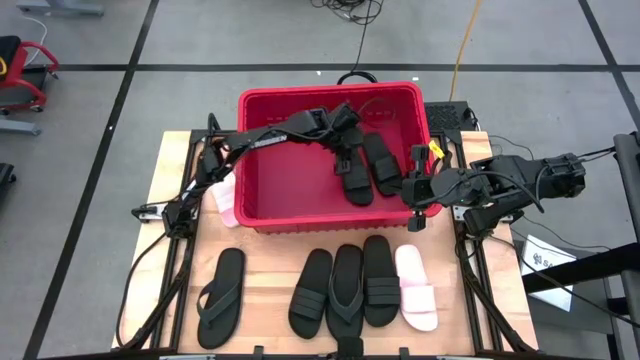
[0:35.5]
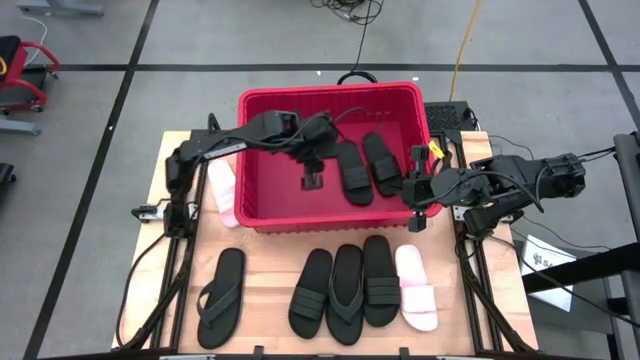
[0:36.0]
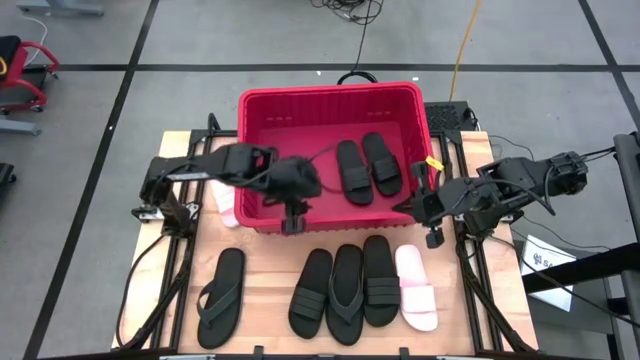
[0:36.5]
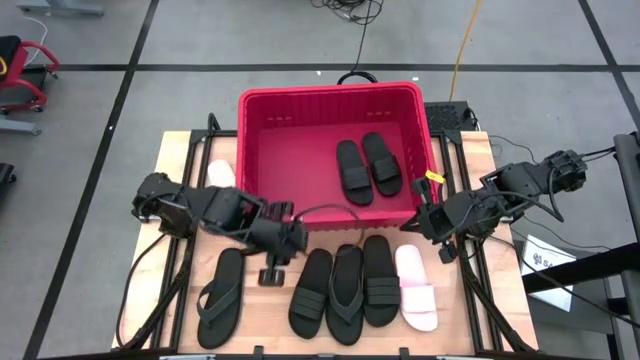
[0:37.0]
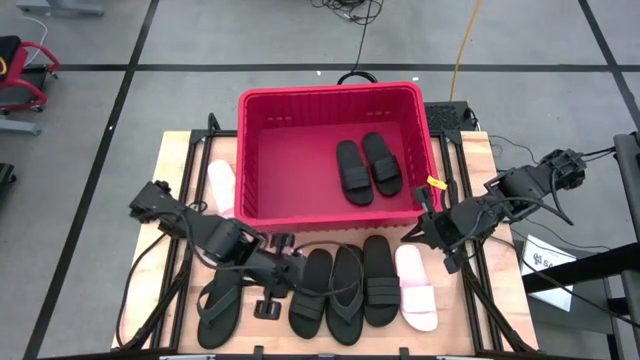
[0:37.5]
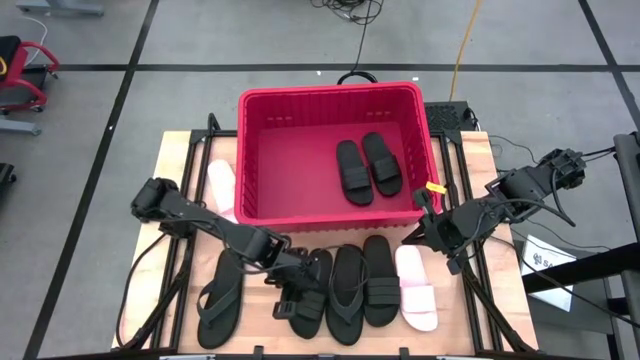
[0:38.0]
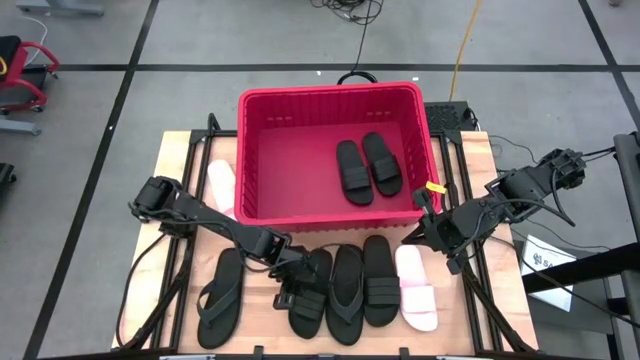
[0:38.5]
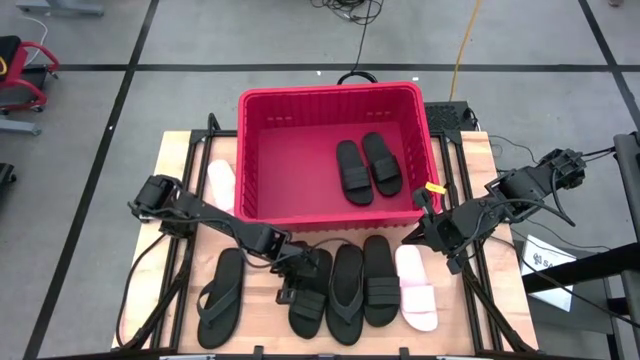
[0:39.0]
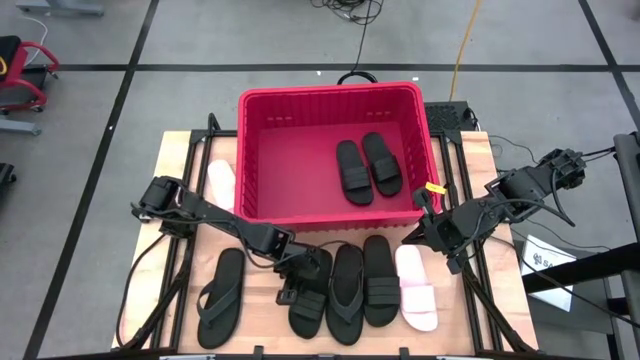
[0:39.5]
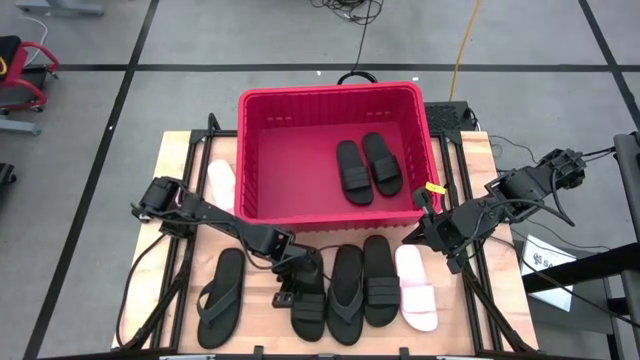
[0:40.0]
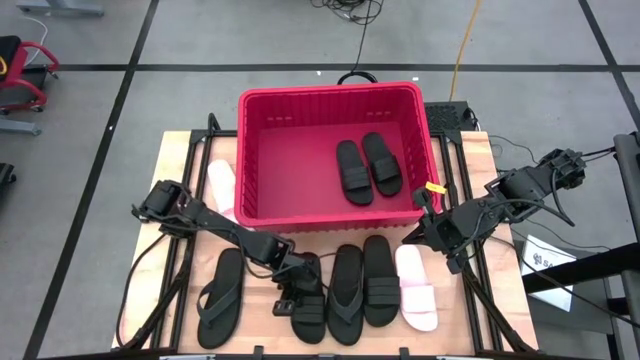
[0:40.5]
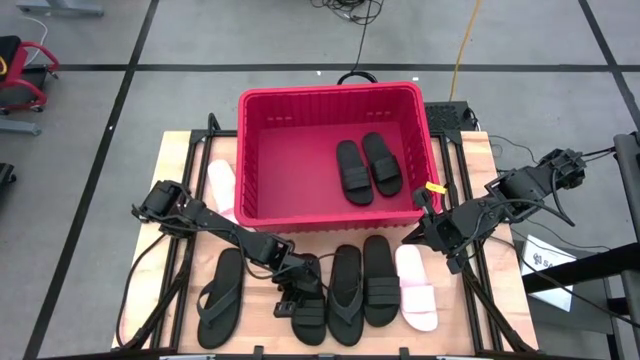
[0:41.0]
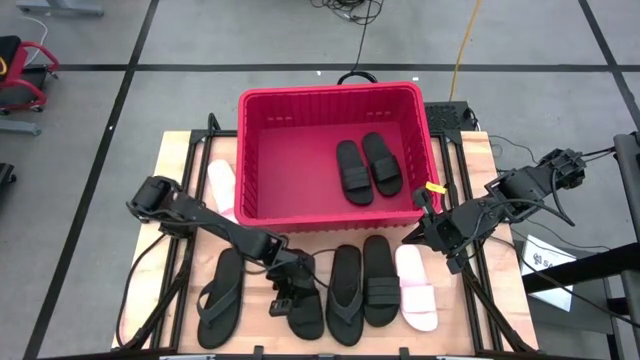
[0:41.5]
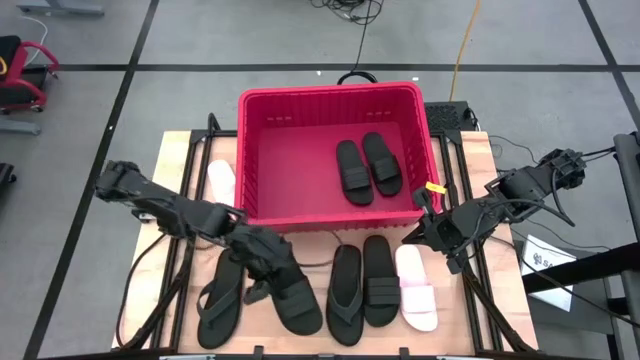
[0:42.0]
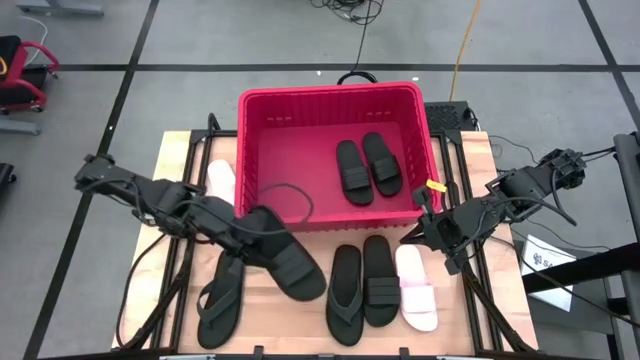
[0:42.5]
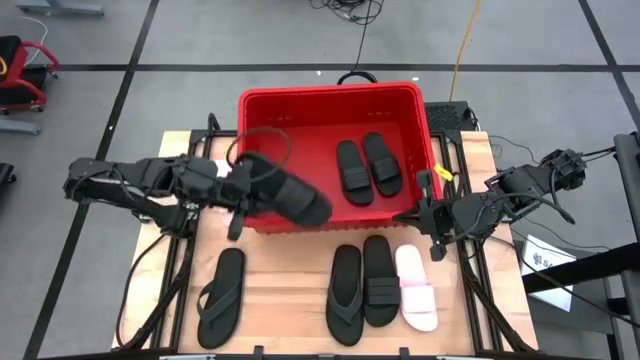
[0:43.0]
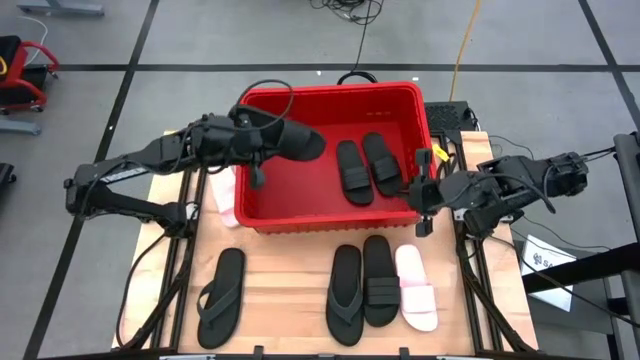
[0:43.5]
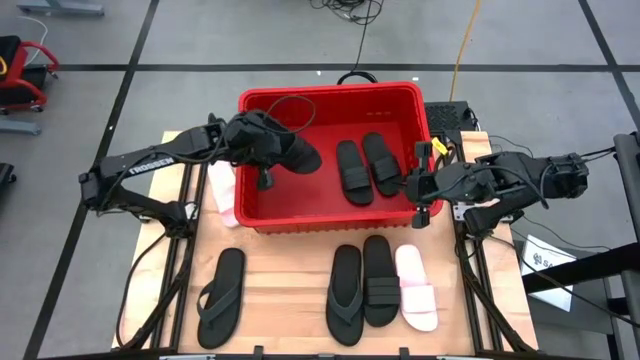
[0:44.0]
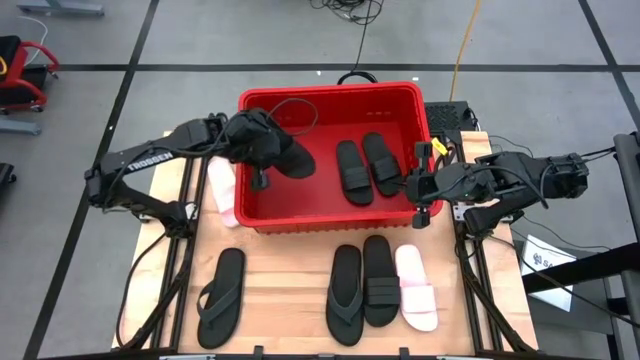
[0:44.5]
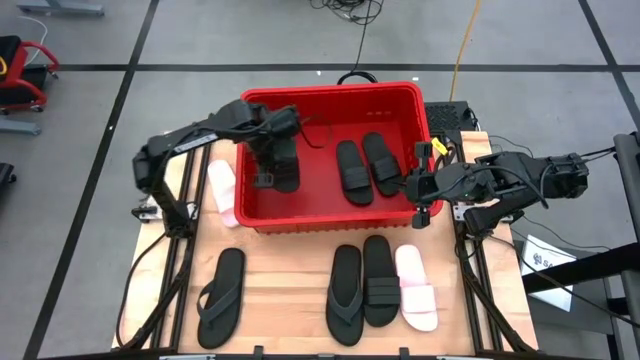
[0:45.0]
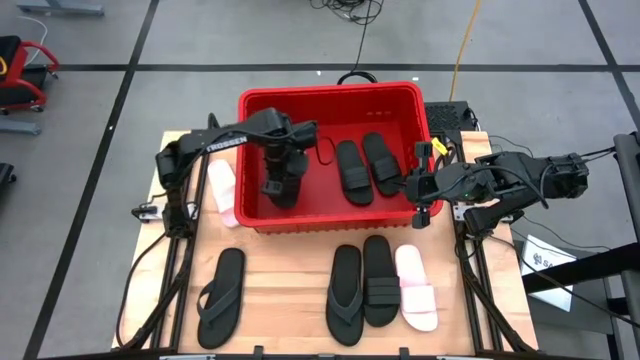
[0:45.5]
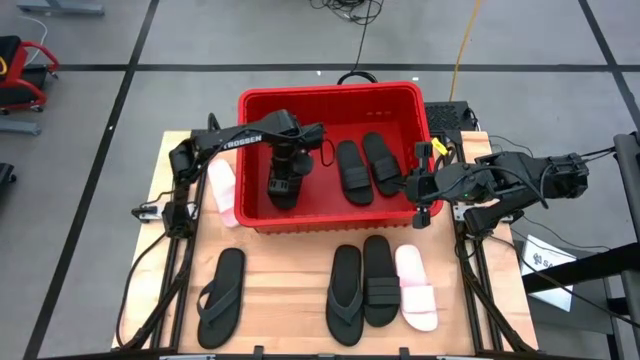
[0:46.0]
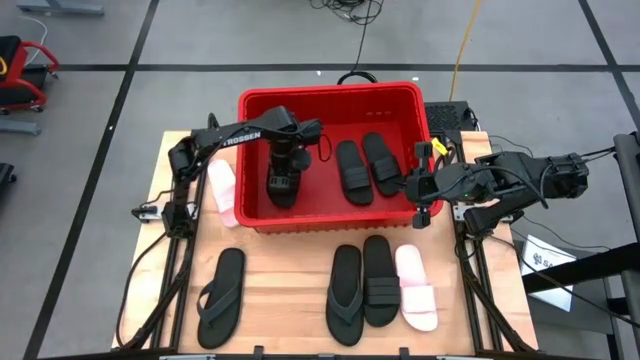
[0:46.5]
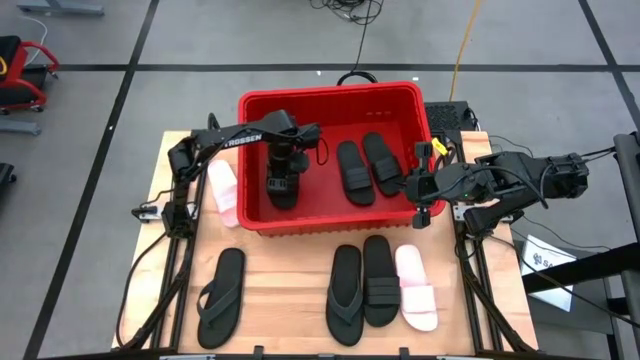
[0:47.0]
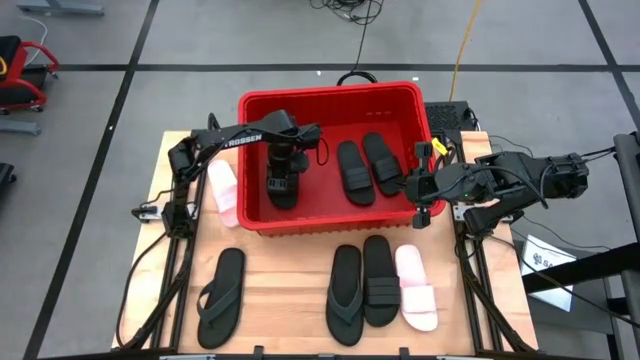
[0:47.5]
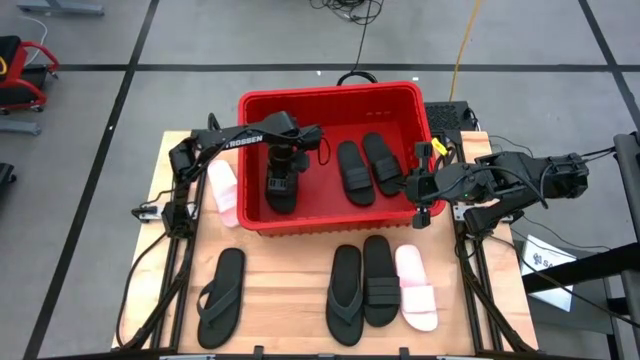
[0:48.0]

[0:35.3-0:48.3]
Task: Pick and place slides into bin
Put the black slipper into the red organizer bin

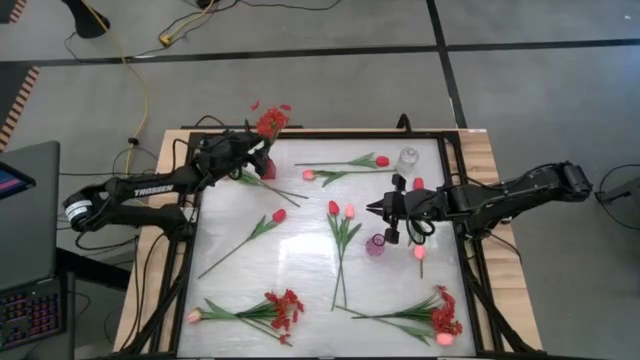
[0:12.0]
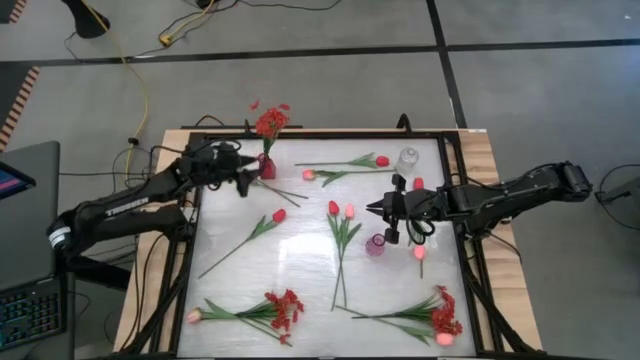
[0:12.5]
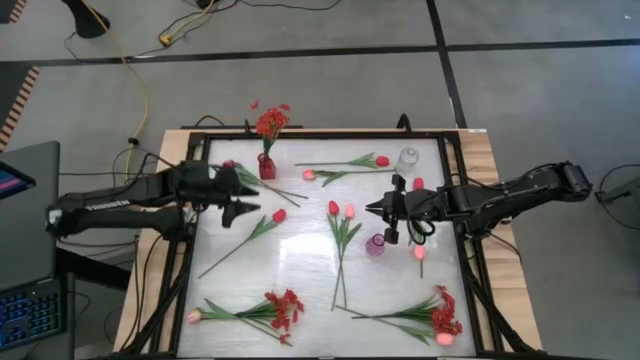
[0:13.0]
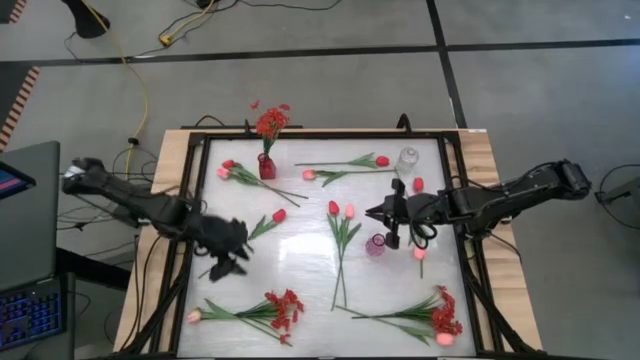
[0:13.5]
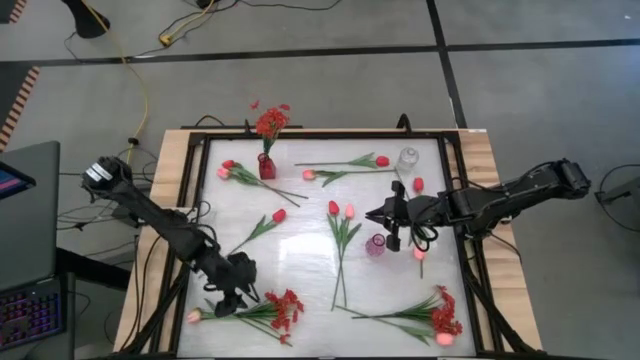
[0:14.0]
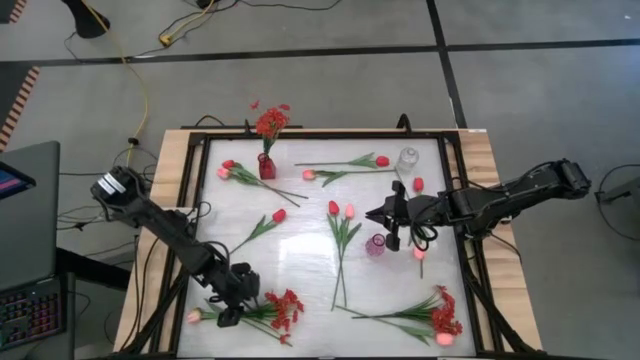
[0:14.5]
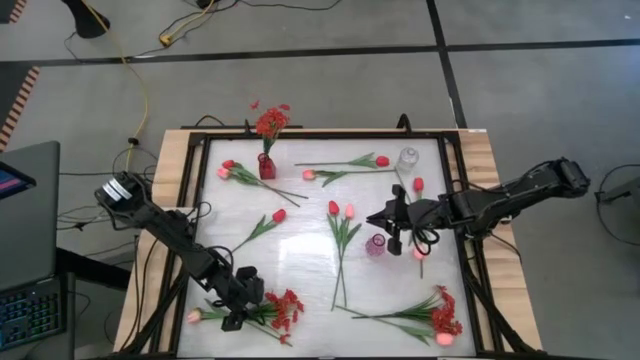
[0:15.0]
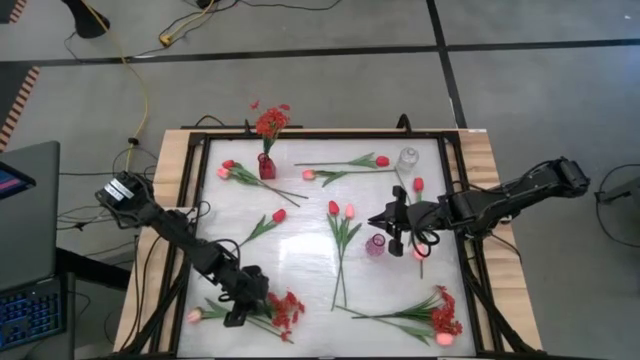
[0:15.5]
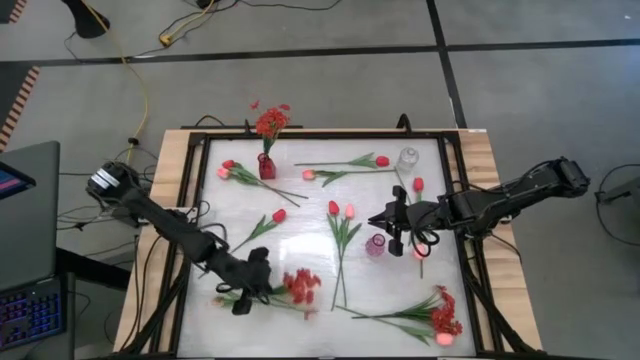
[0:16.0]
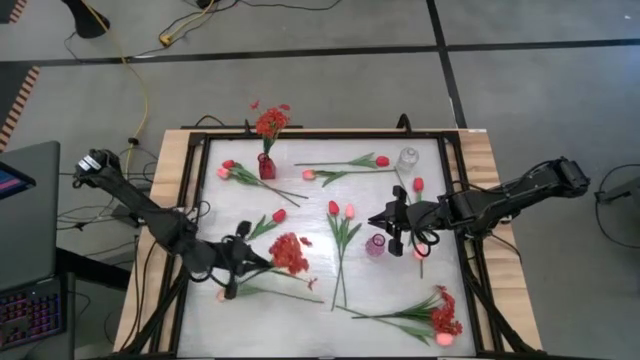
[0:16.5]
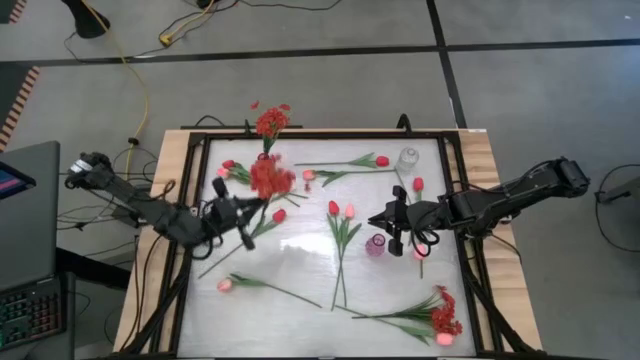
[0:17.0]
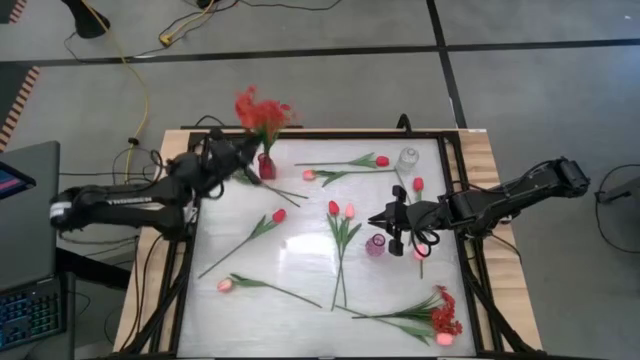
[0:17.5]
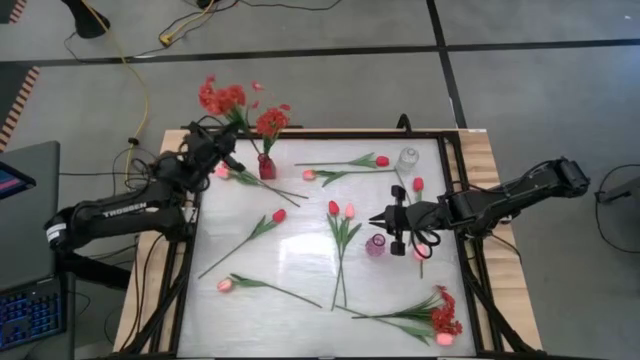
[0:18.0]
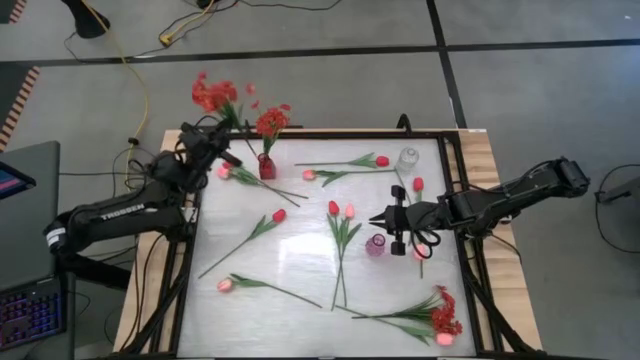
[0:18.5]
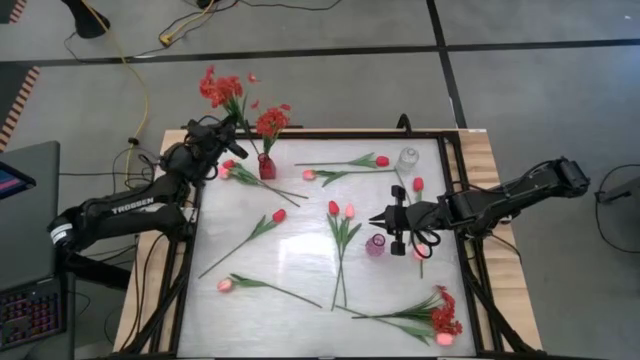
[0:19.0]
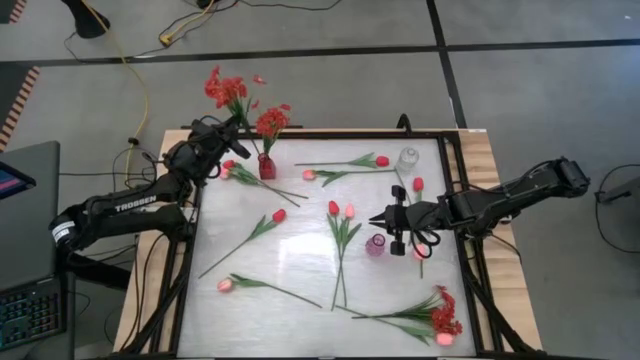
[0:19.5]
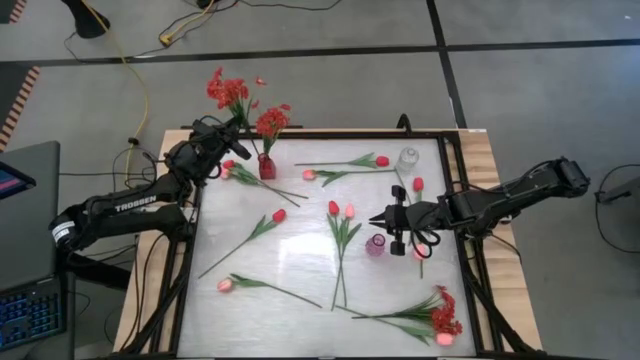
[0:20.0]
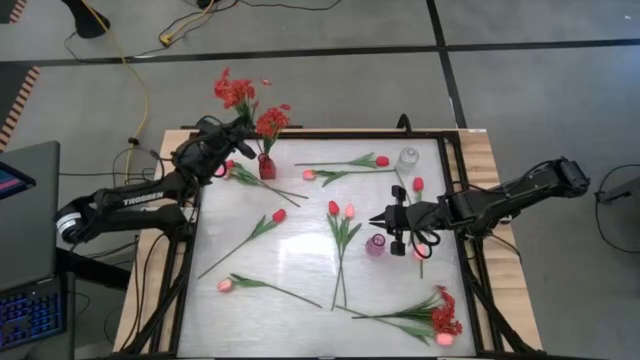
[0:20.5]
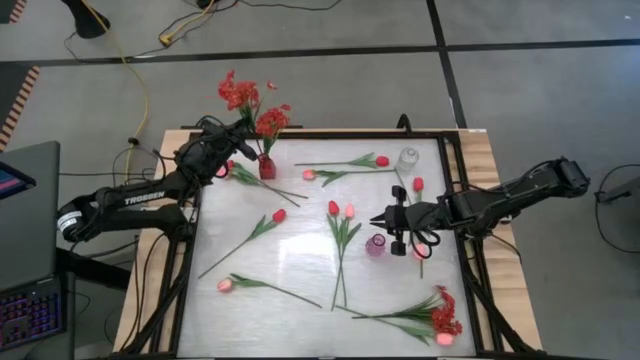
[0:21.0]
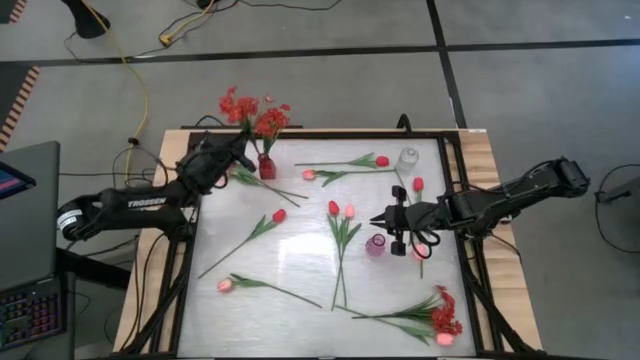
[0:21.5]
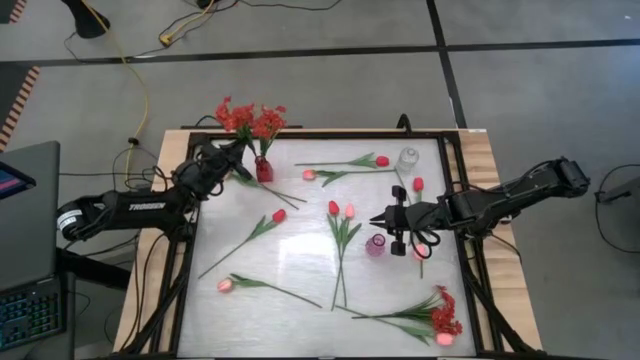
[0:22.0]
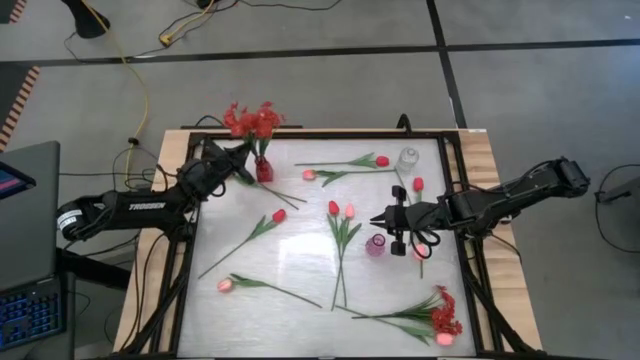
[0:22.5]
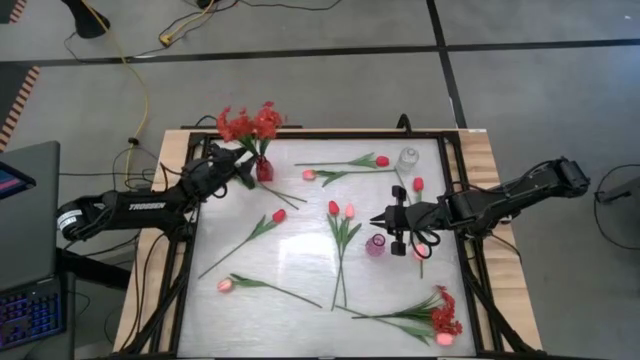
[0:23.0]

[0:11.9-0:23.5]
Task: Sort flowers into vase by color
Put the orange flowers into the red flower vase
